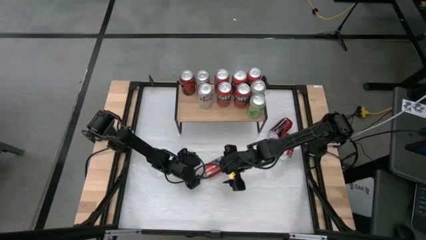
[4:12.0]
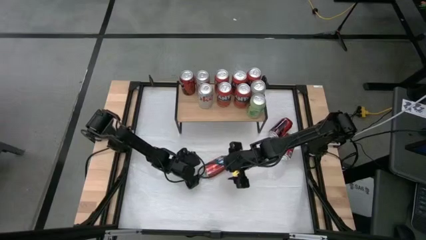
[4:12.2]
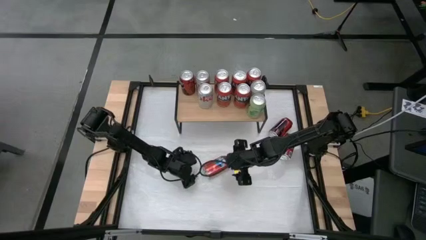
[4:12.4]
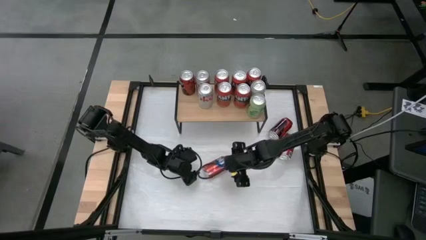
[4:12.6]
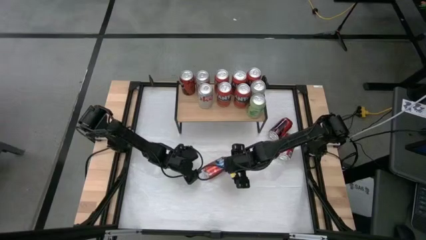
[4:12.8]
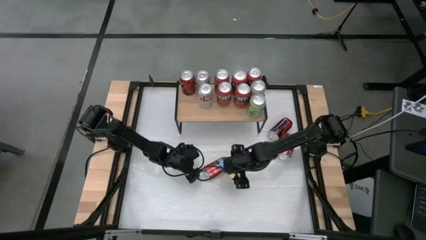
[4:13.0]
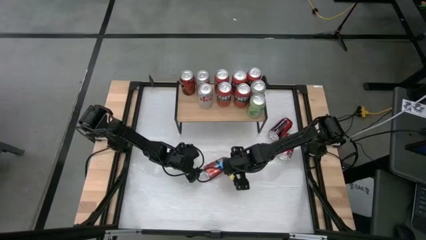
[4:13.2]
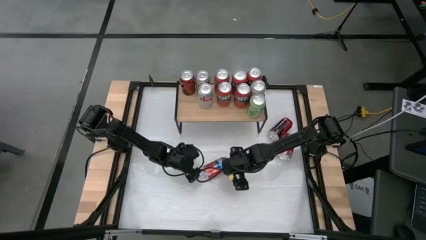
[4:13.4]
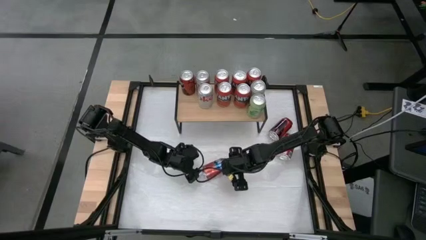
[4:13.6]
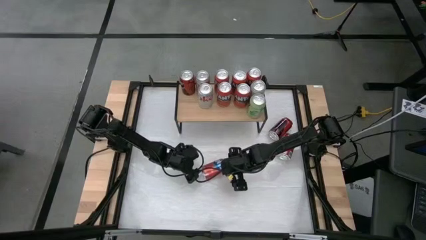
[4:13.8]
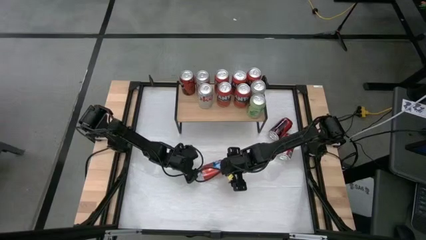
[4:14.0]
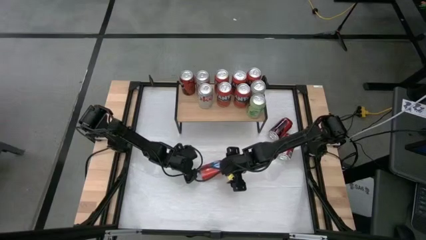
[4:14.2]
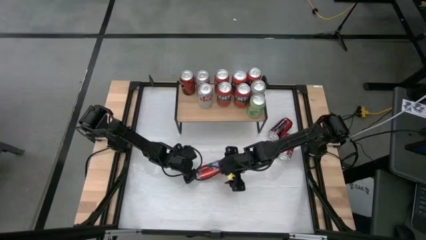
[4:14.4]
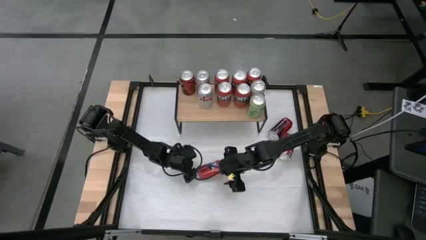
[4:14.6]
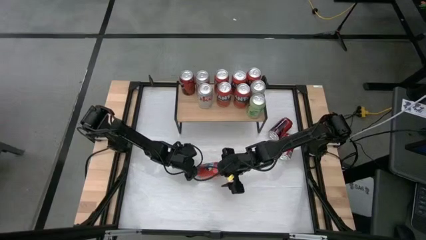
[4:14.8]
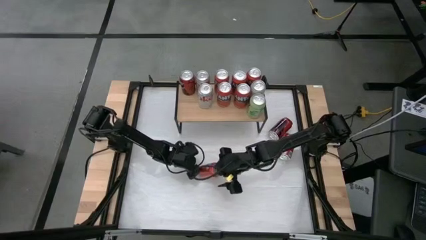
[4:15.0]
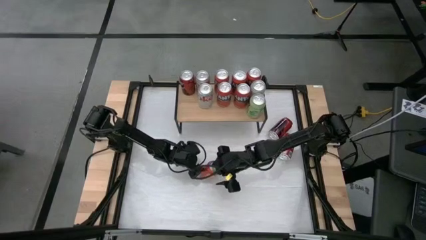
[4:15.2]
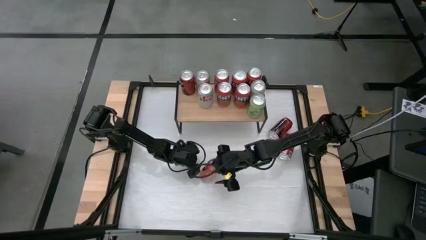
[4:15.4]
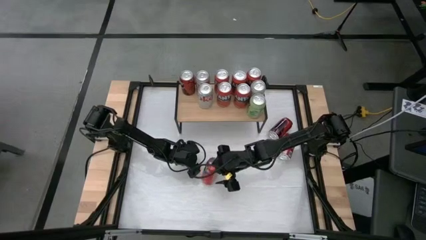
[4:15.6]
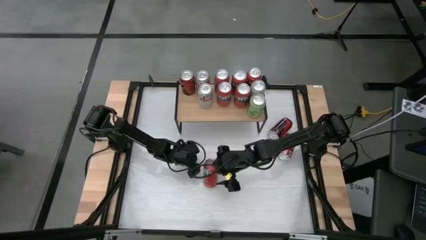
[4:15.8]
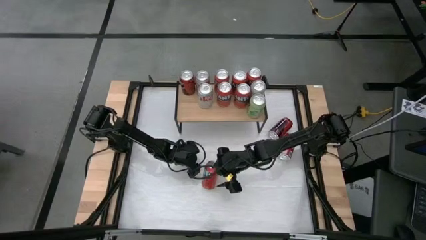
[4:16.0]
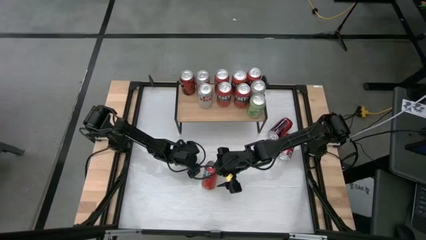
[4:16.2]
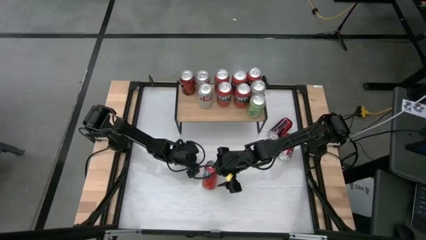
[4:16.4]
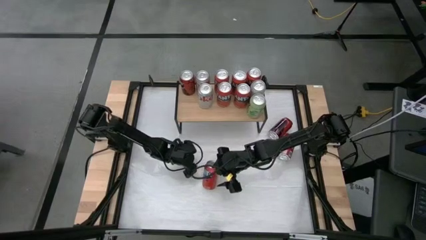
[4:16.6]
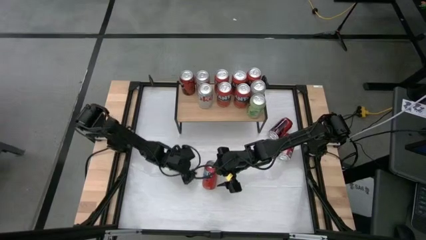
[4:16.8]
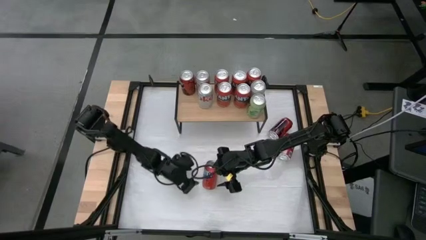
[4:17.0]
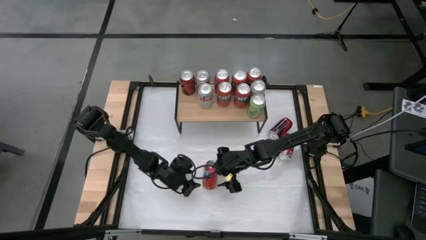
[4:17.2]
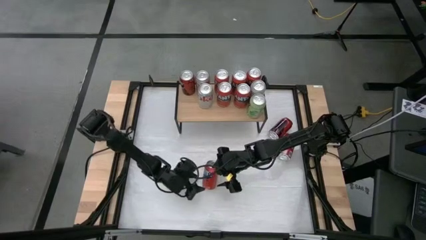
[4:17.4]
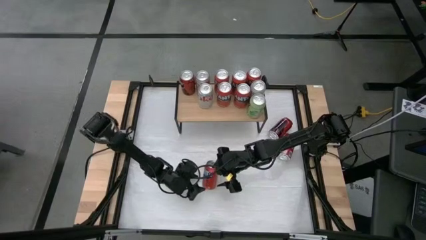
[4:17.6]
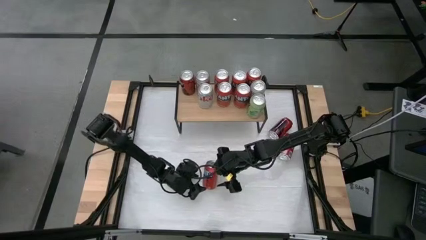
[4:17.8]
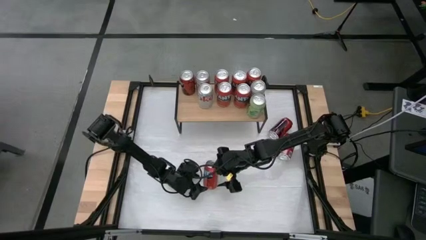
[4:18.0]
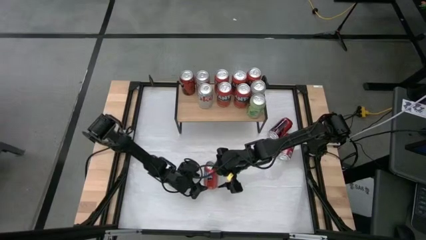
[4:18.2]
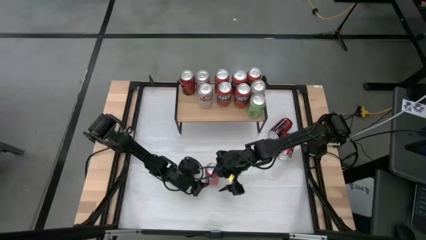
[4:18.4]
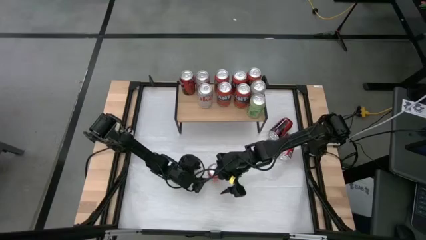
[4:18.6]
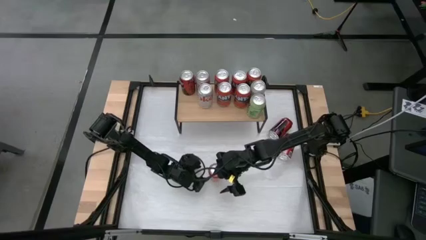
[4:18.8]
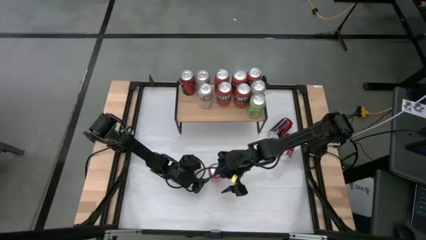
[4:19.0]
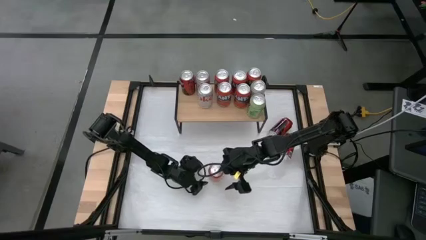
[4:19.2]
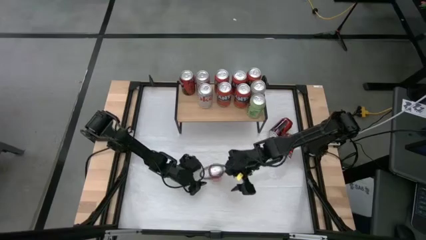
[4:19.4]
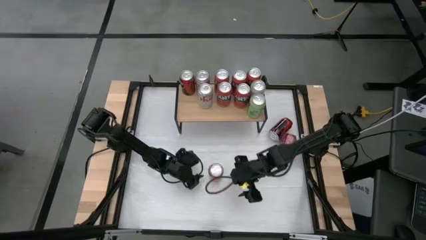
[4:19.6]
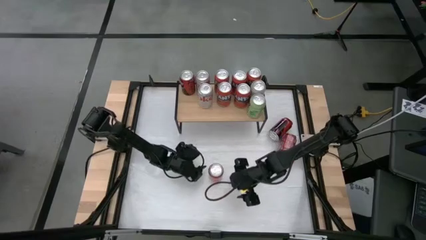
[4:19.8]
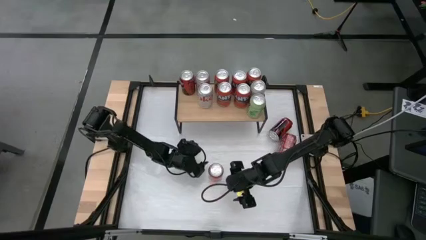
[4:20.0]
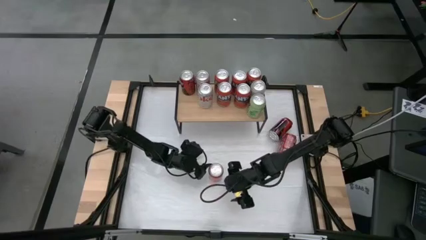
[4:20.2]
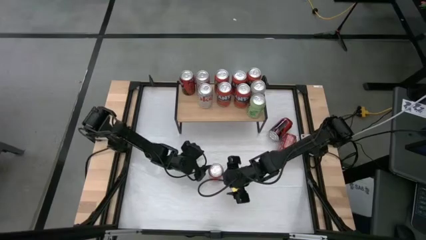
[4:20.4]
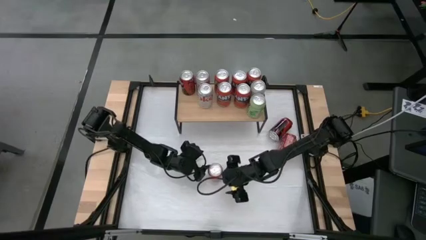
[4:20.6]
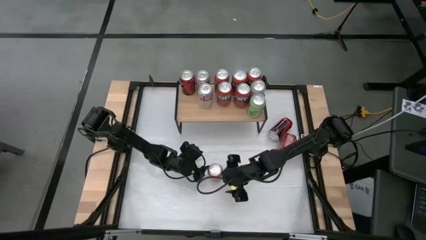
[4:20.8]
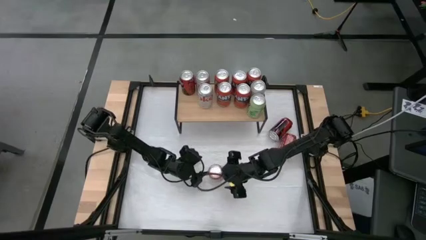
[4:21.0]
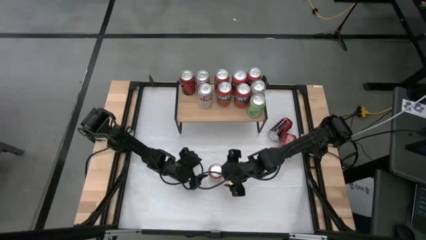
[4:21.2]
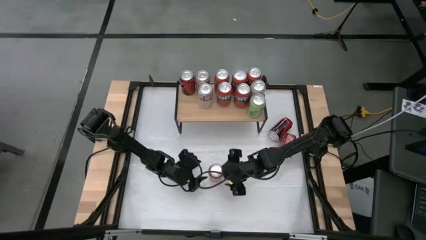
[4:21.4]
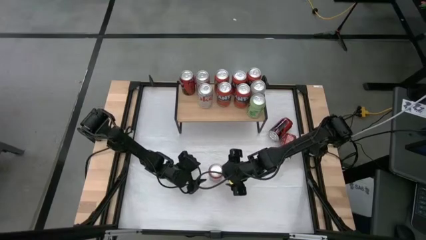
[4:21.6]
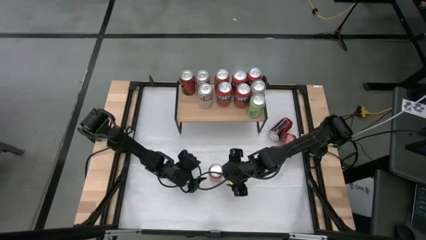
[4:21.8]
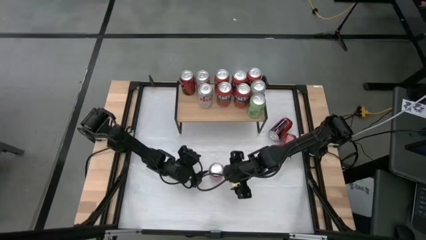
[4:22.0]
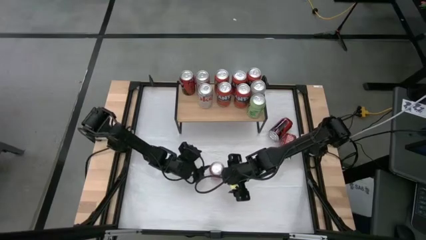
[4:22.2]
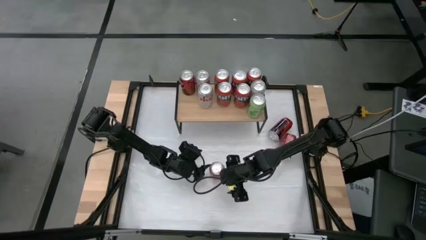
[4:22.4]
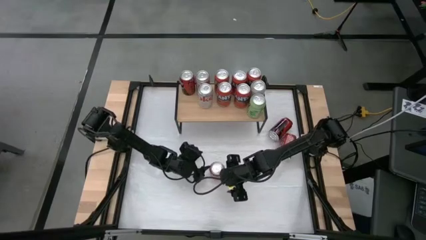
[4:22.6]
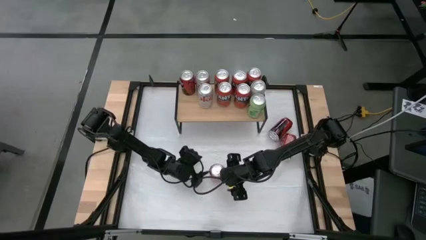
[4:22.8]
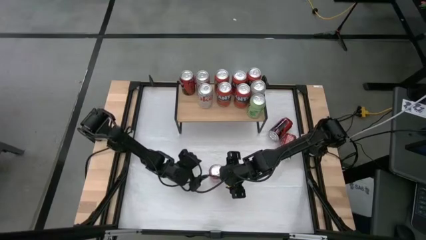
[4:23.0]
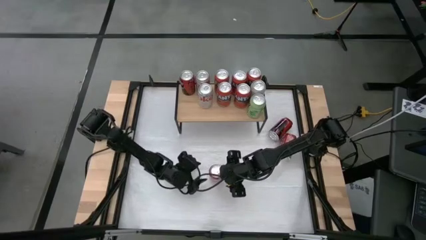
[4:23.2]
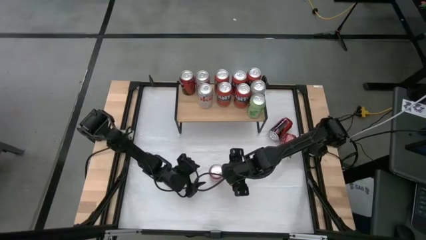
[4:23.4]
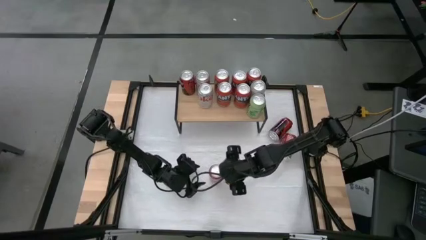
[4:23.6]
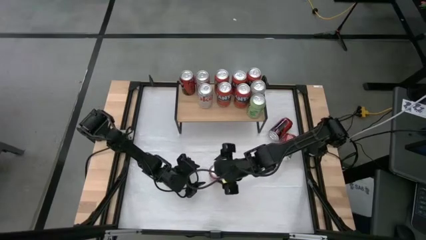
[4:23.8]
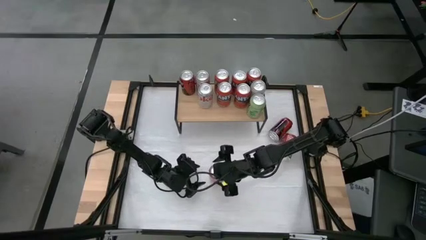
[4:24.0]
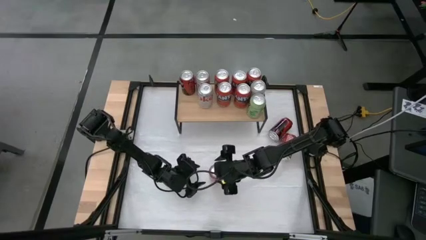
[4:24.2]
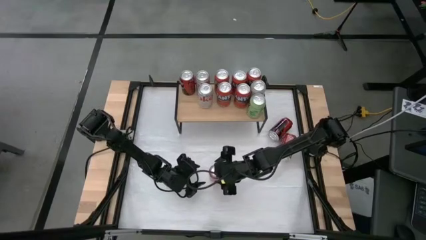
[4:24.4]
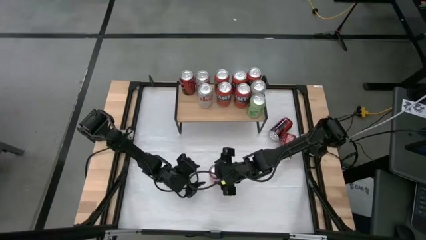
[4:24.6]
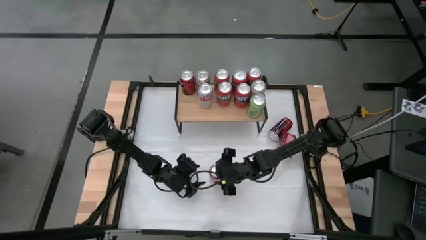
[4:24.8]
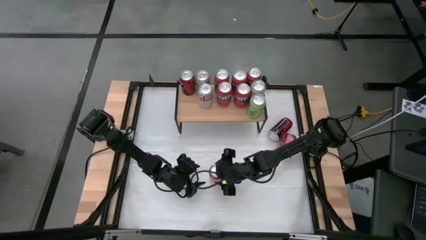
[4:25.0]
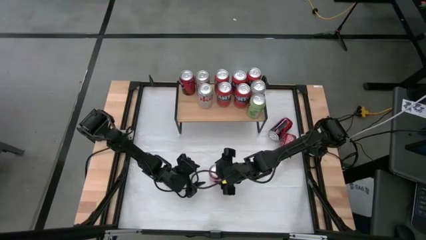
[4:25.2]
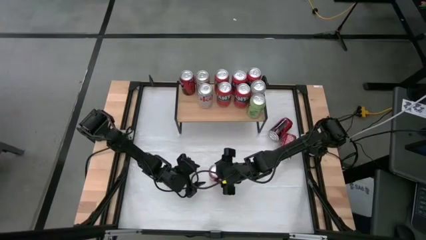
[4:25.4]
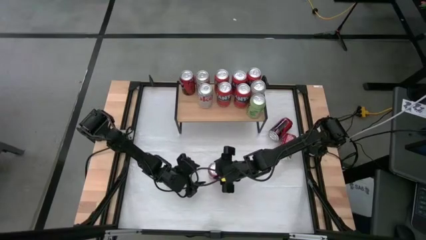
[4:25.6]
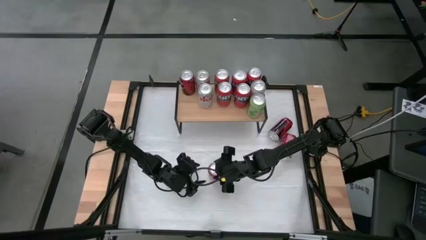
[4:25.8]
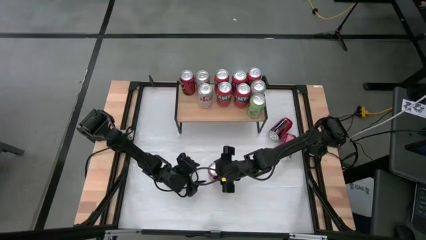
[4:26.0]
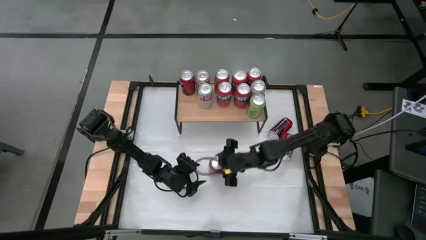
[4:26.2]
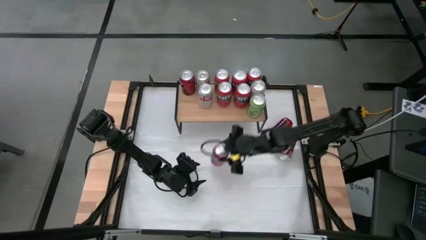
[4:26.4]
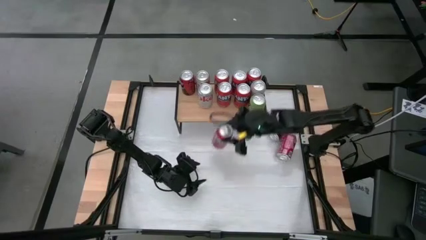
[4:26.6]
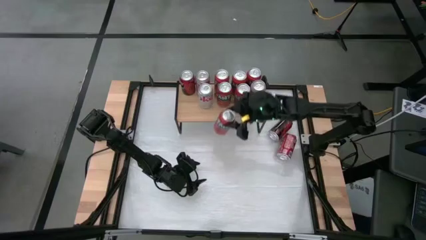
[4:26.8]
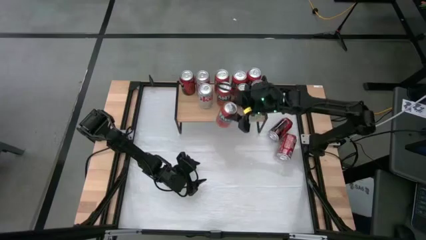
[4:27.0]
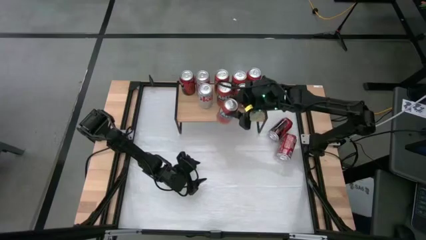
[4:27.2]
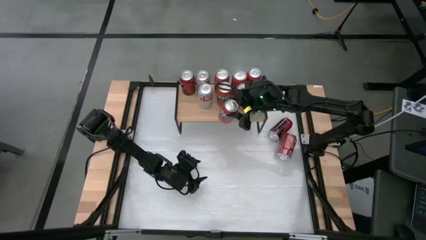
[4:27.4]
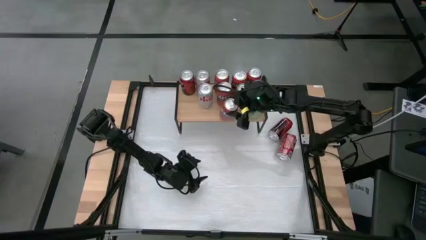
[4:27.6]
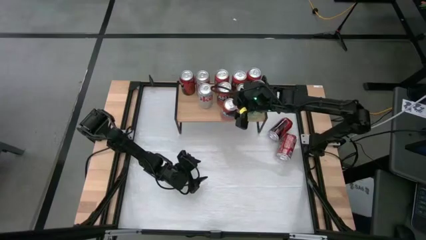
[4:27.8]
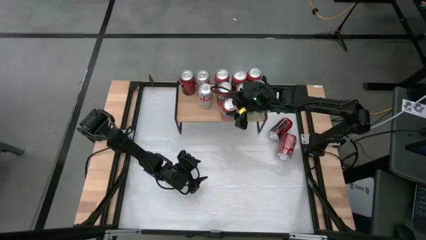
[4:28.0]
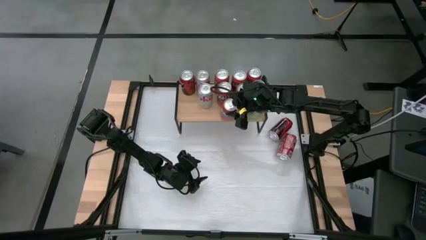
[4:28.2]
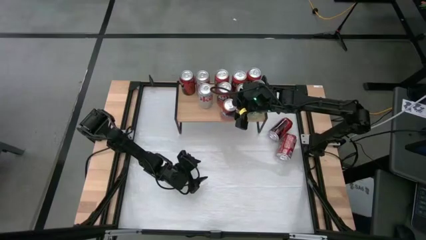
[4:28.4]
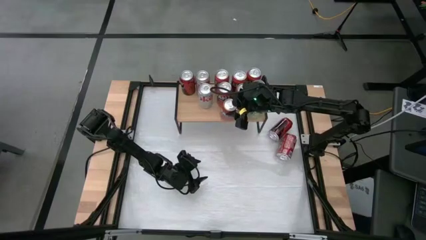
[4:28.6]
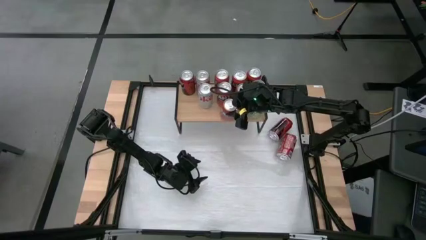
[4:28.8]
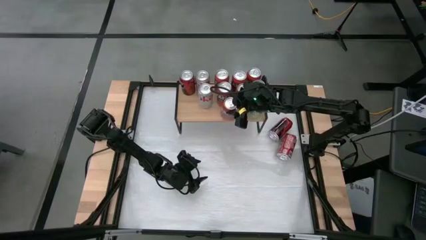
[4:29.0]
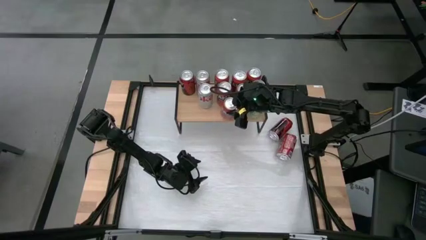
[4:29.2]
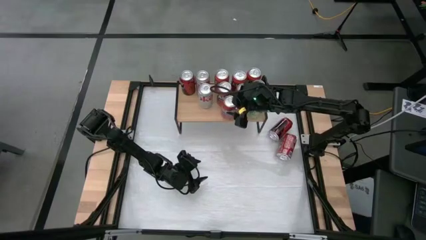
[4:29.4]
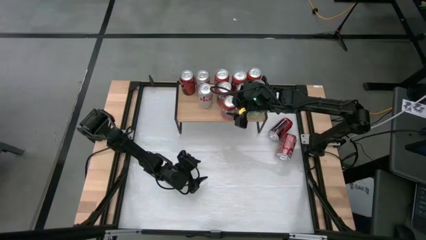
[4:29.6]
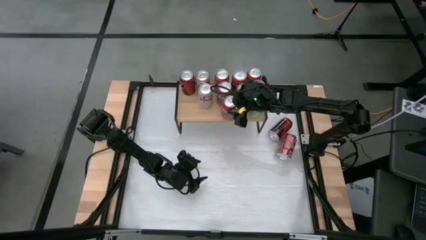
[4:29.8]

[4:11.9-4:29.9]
Task: Place canned beverage on shelf
Put the orange soda can on the shelf aligned with the other soda can
